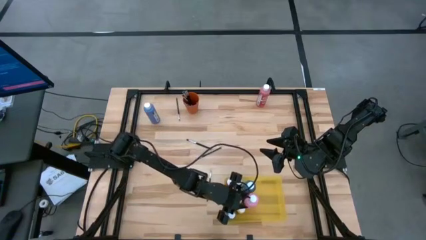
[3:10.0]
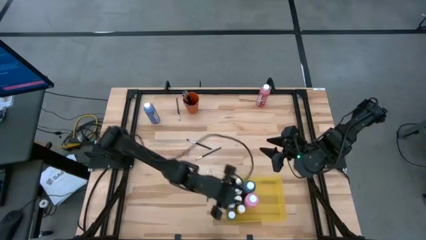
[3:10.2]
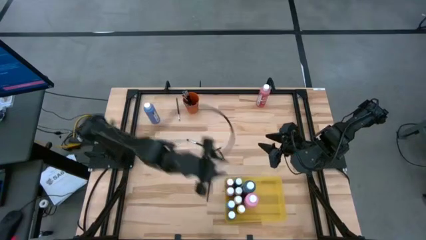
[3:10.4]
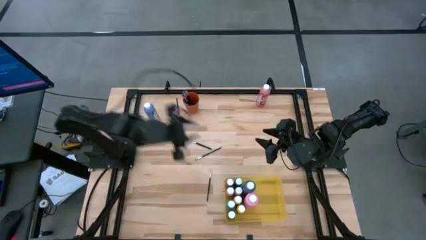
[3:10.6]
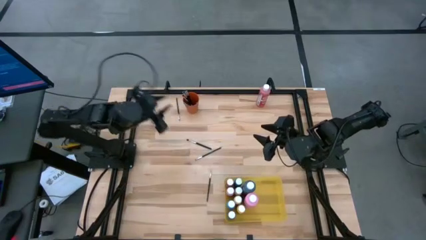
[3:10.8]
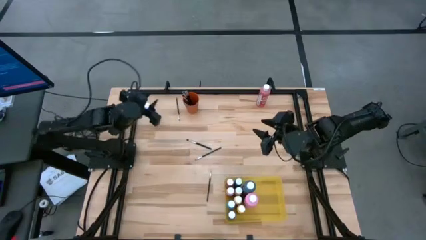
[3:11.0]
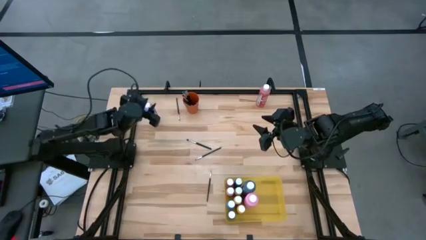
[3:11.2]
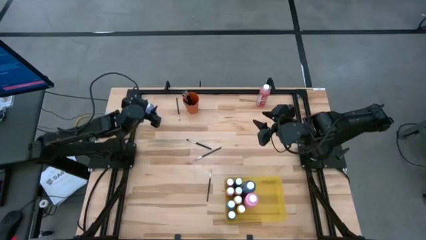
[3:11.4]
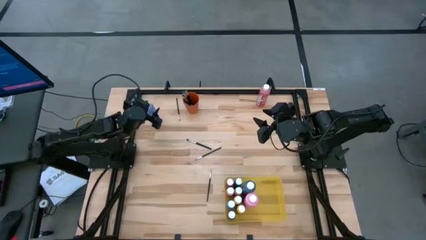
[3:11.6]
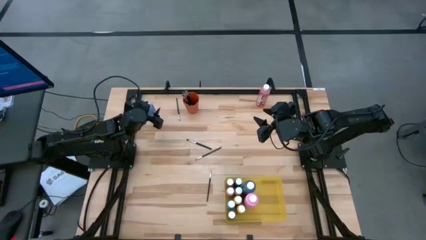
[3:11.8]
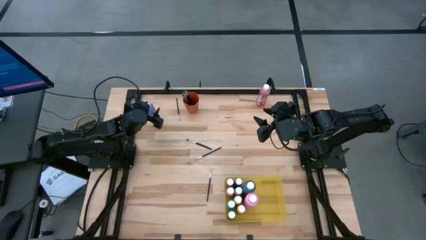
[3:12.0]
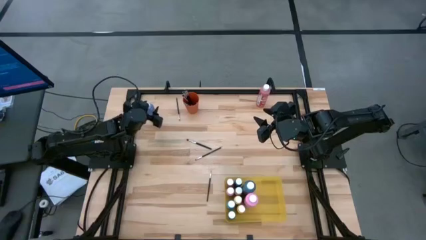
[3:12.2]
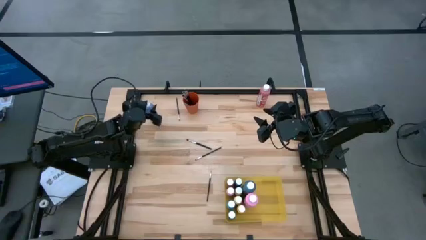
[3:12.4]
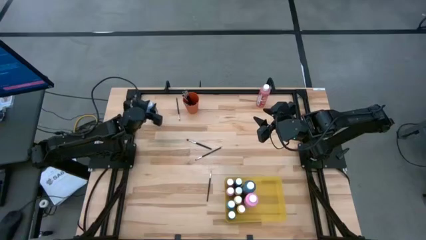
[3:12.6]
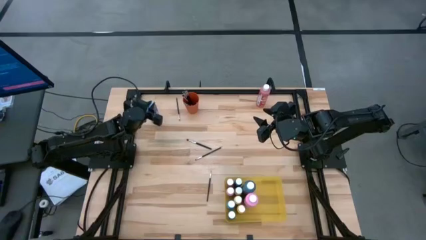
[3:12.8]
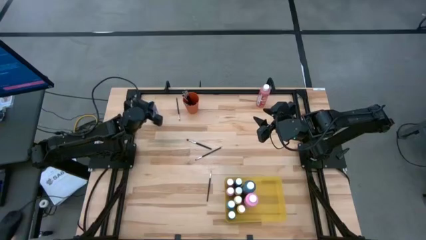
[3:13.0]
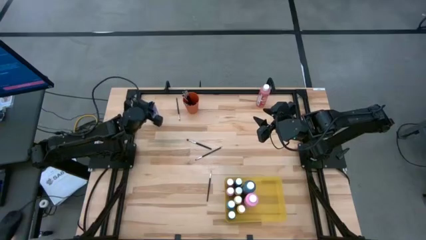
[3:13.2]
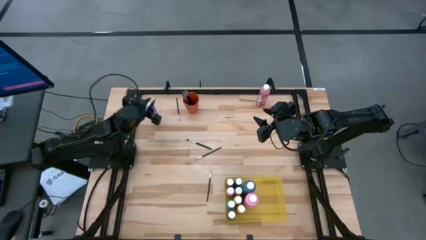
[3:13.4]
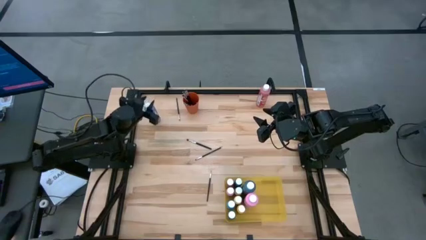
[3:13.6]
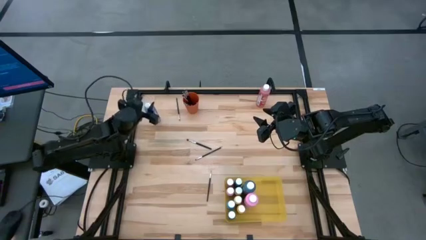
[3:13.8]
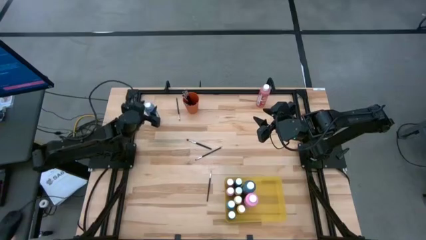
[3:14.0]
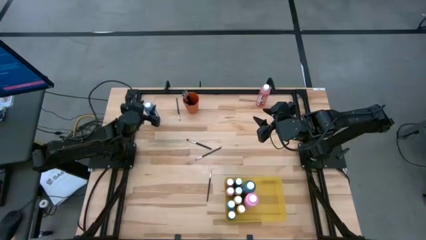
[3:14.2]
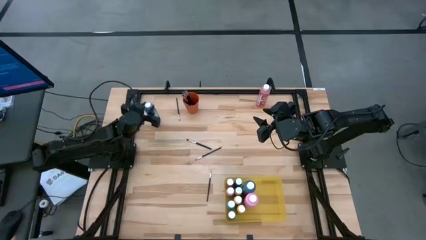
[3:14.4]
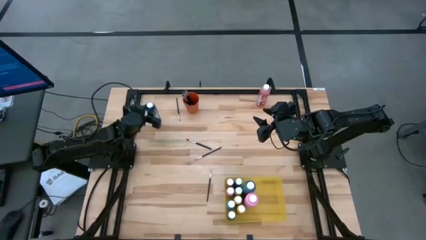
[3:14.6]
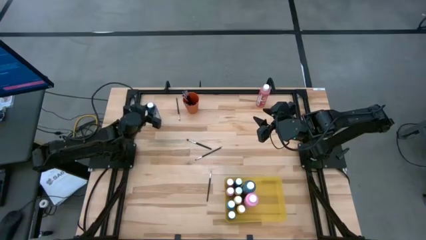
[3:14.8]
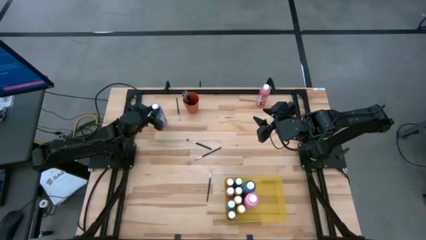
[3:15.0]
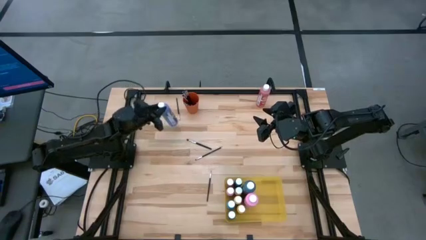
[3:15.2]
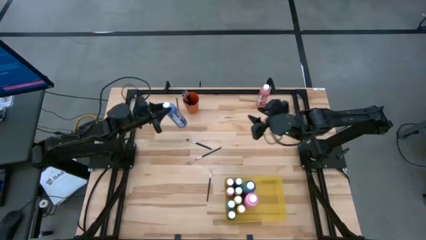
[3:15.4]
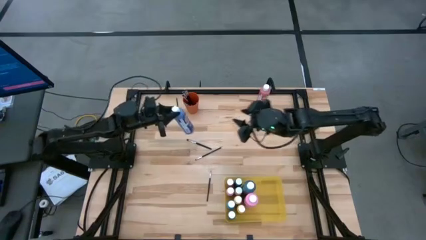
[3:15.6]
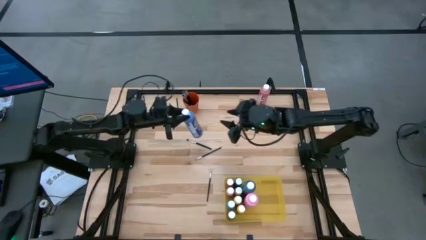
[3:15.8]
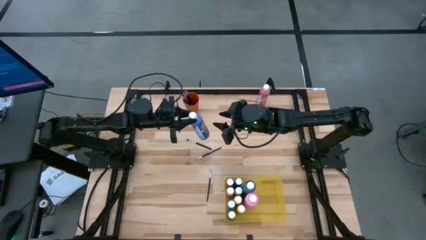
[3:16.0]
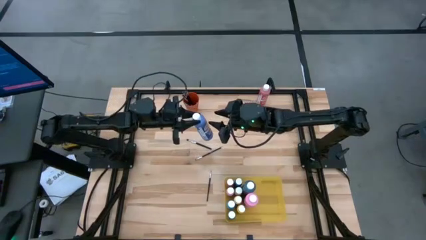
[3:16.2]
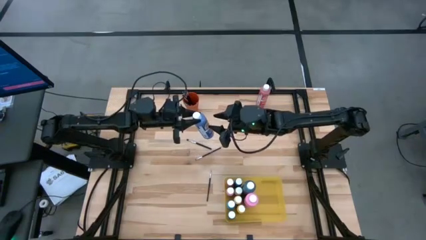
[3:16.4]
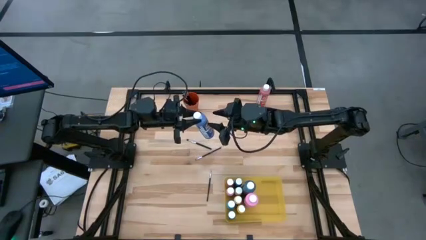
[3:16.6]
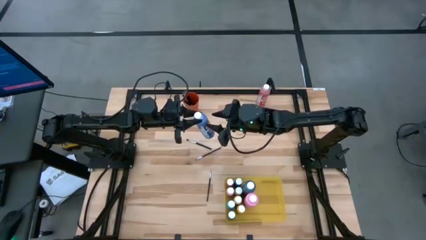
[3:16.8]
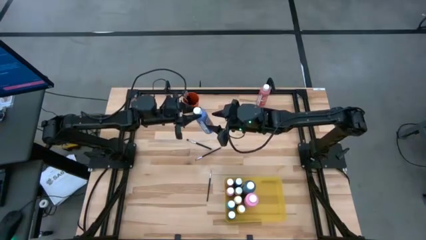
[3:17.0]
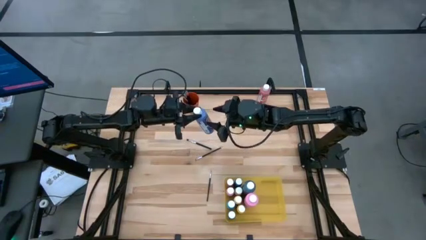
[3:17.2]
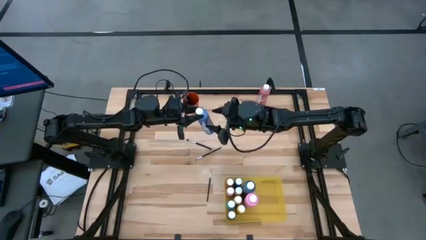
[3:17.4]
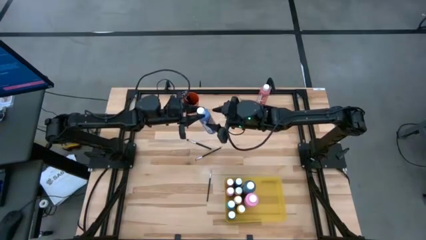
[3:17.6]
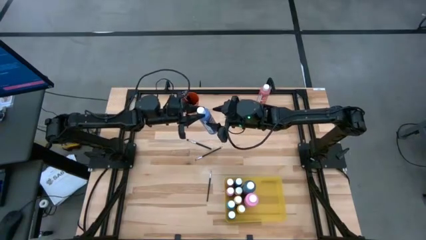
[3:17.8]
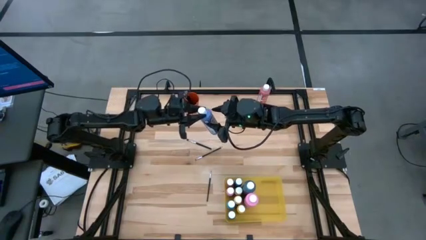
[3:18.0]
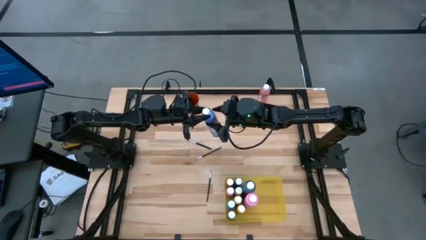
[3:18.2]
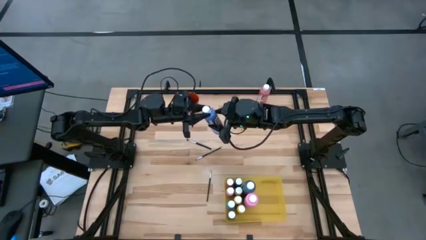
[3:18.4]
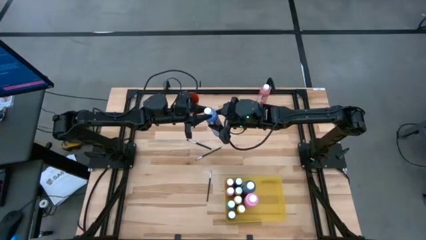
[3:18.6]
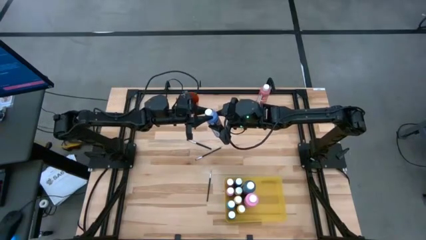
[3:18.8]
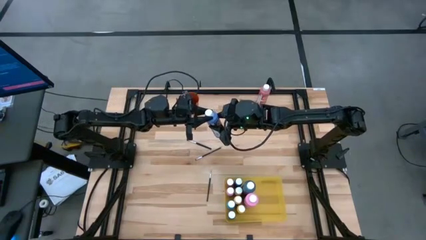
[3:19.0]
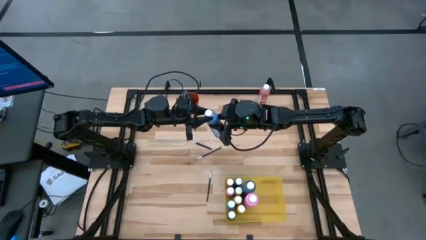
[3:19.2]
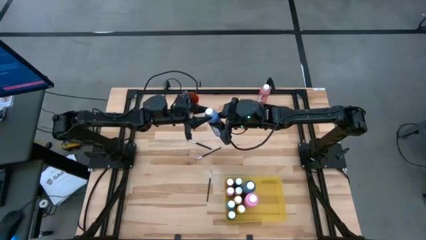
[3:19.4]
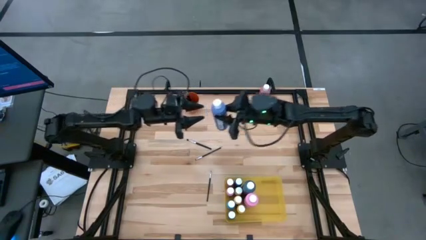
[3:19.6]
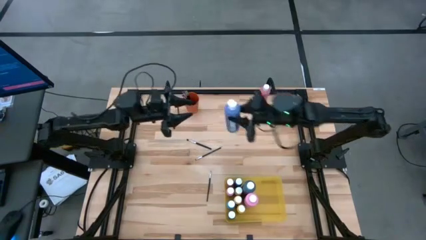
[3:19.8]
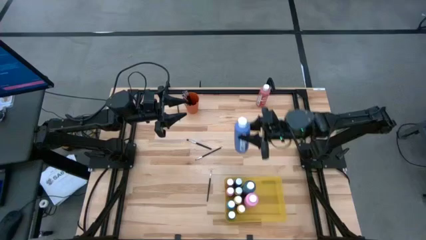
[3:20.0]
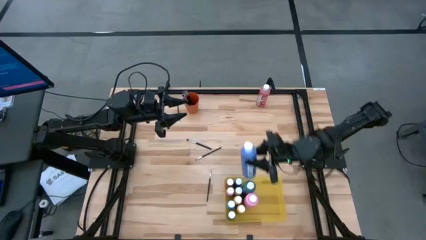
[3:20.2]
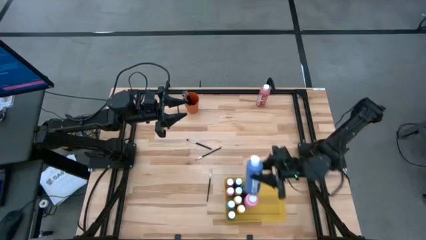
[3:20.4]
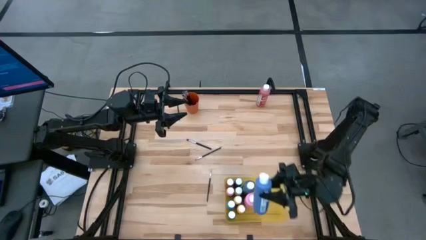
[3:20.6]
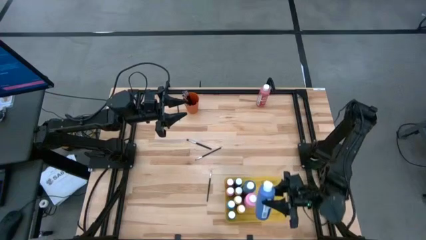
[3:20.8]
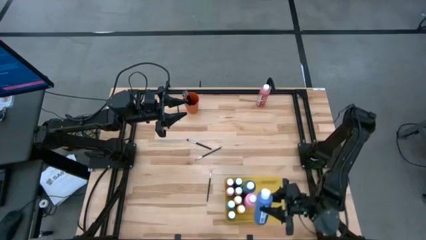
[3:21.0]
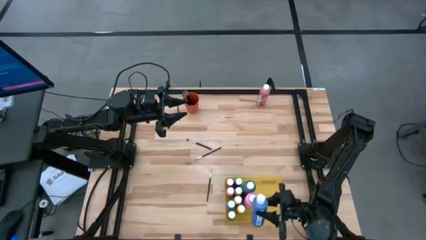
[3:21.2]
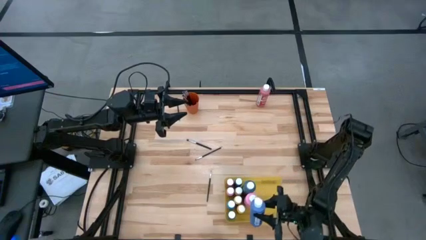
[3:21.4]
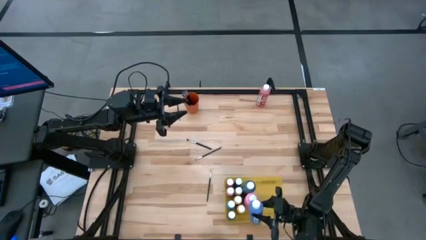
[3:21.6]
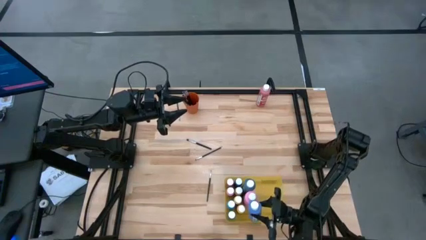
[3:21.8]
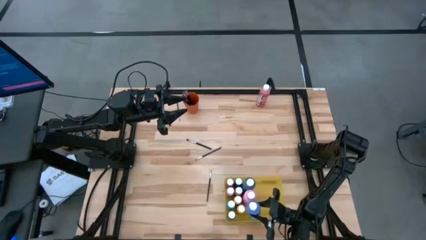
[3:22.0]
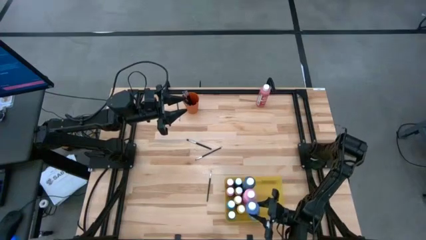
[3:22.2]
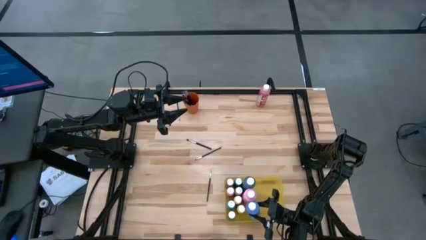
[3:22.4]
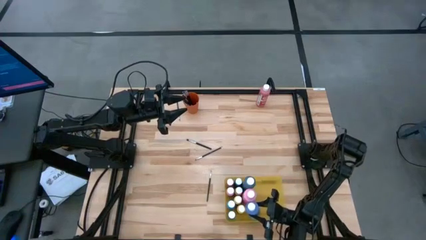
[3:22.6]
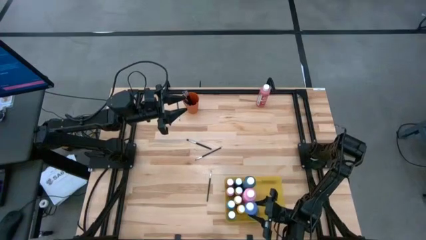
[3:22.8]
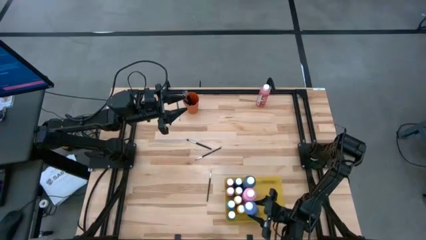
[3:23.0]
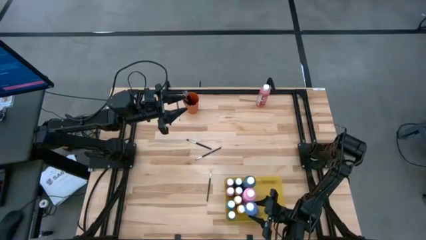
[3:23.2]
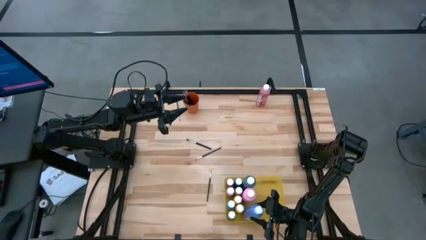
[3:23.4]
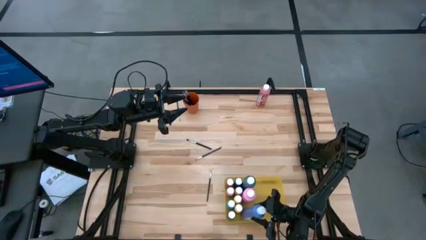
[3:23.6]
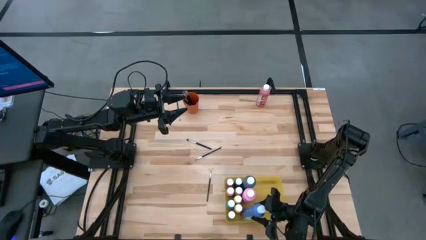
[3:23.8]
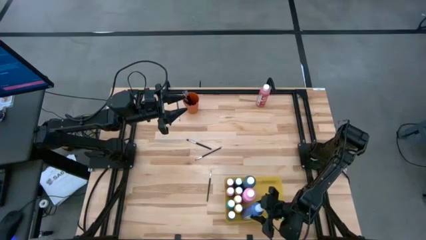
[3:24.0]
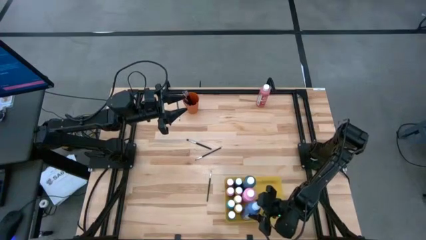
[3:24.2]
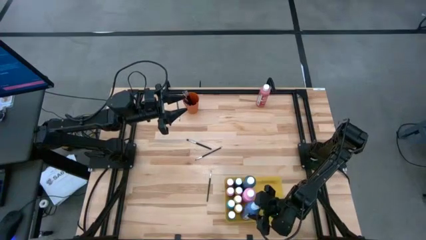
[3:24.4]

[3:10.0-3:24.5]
Task: Pick & Place Paint Supplies
Put the purple paint bottle into the yellow bin
